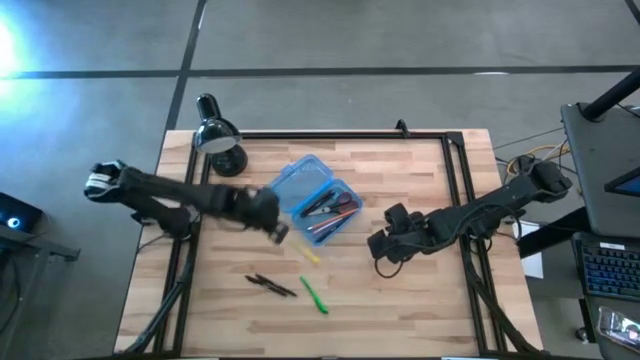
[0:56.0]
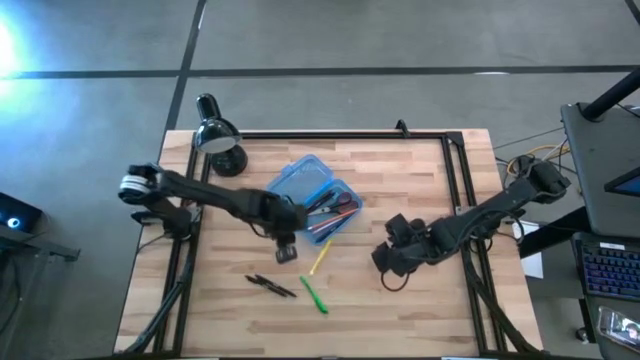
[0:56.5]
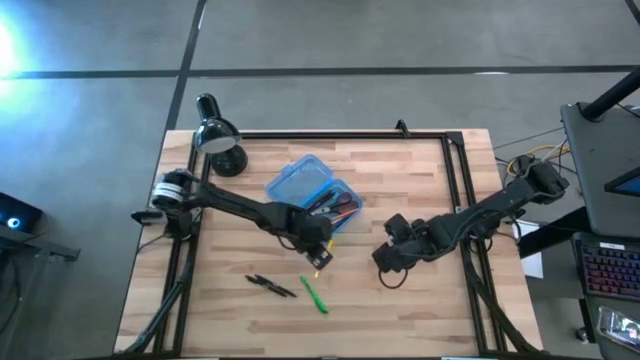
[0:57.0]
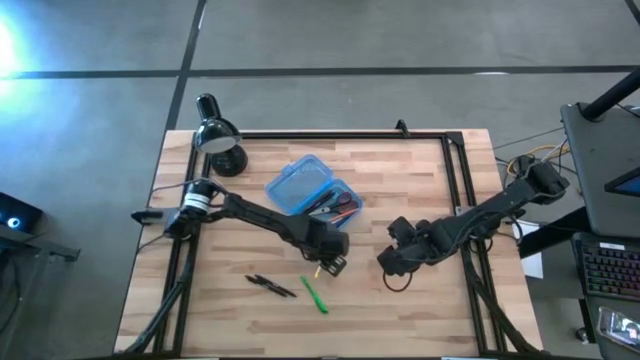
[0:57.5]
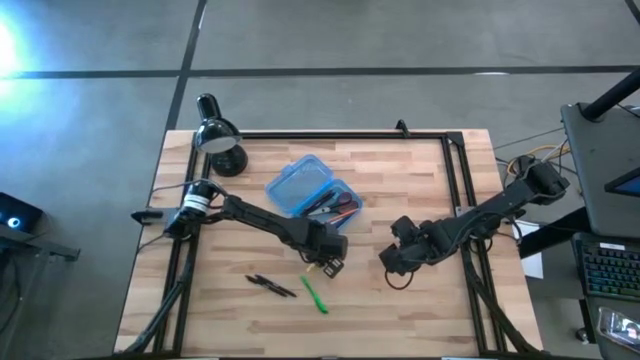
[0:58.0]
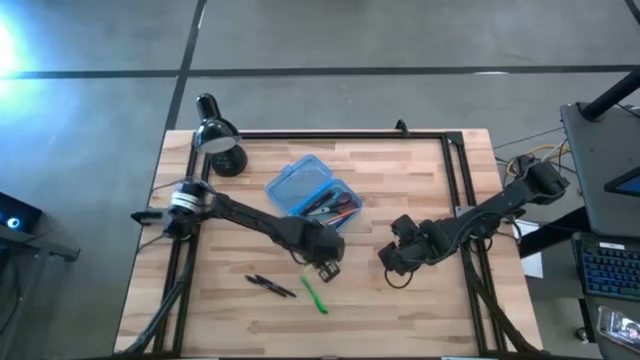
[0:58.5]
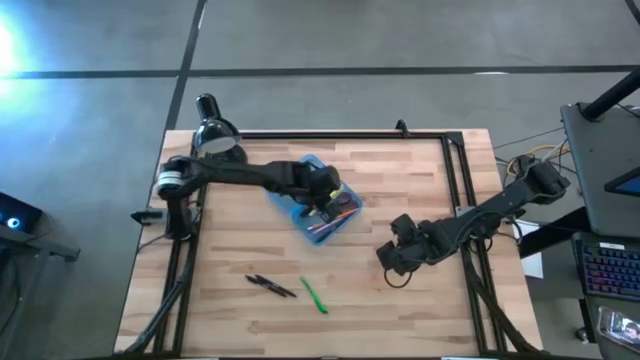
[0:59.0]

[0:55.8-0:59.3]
Task: Pick & place school supplies into a supply box
Put the yellow pen into the supply box

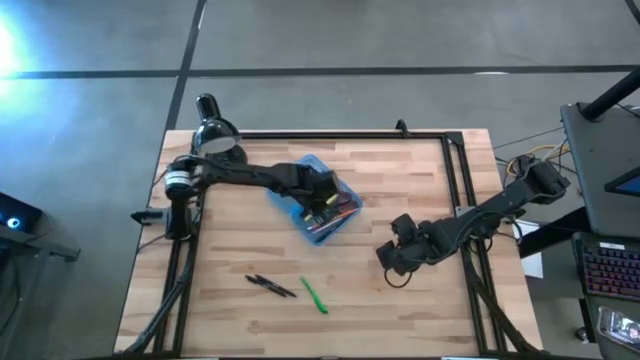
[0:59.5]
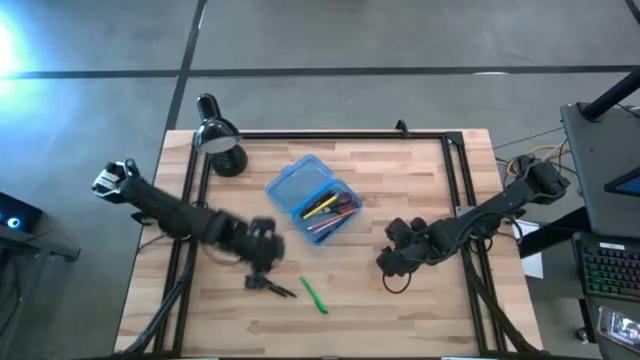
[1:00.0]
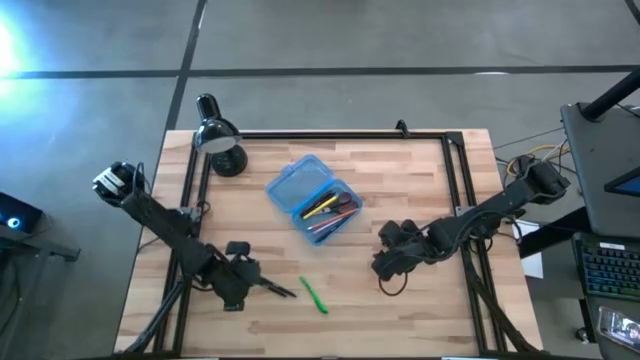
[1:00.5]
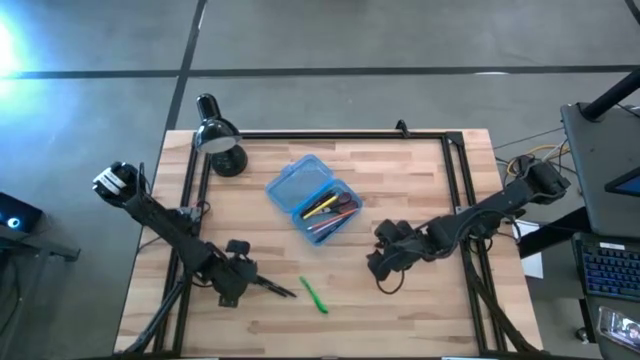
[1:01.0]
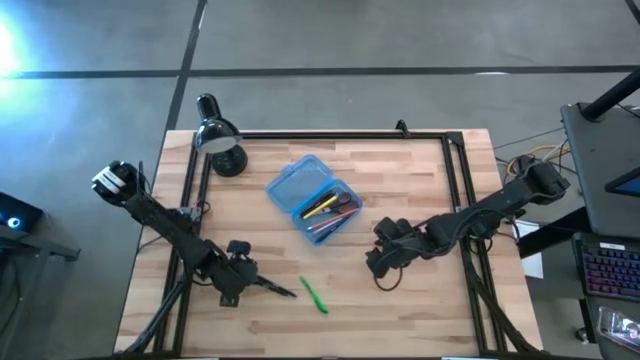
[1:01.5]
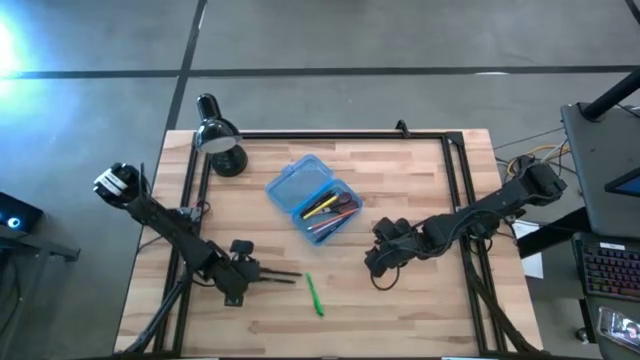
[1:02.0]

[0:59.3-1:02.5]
Put the left black pen into the supply box

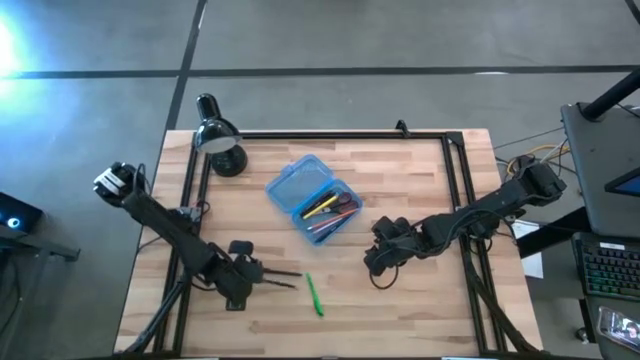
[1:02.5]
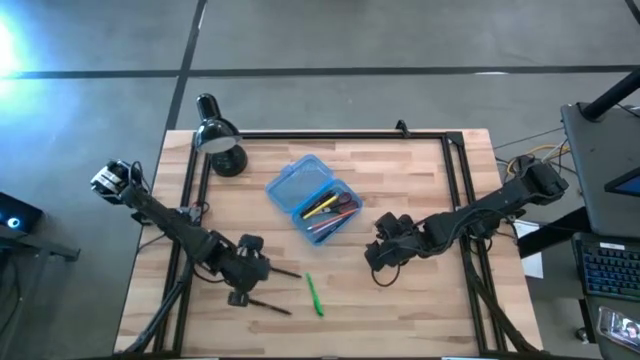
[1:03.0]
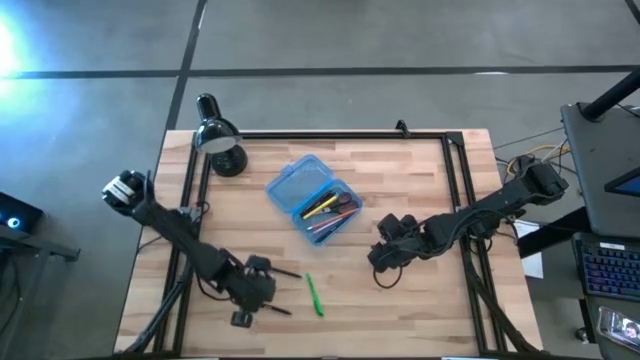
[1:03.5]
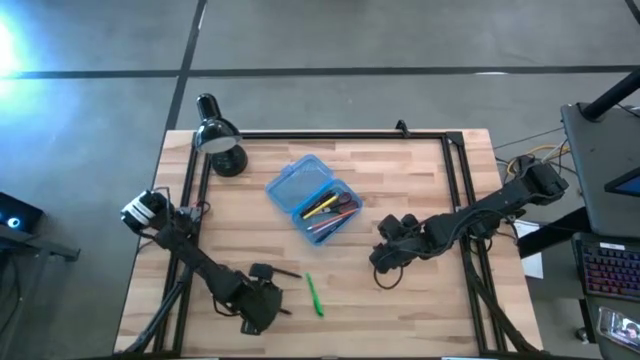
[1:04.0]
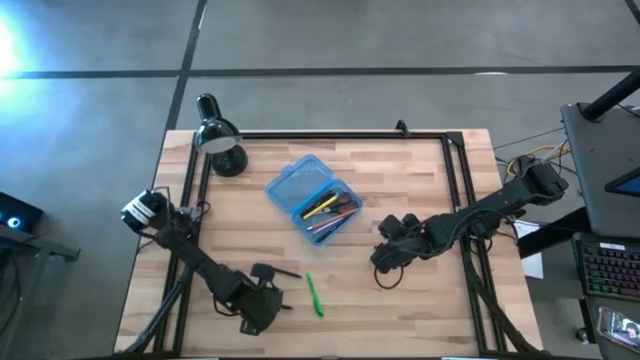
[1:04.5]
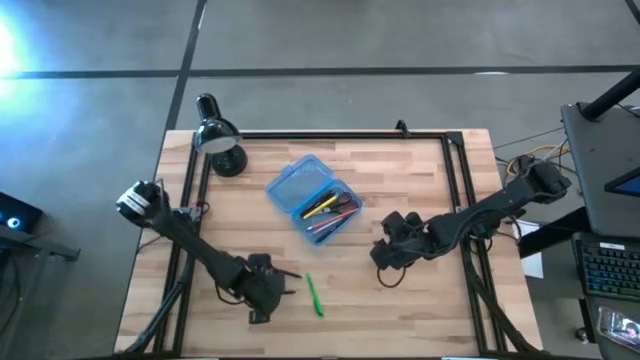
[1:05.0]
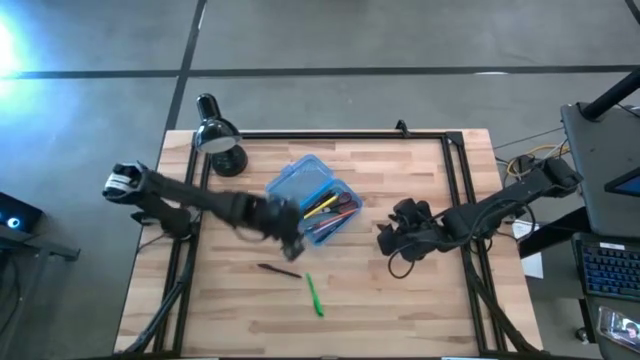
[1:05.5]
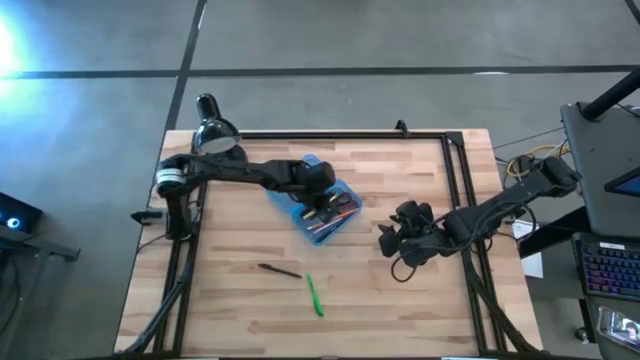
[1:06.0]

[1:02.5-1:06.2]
Put the left black pen into the supply box

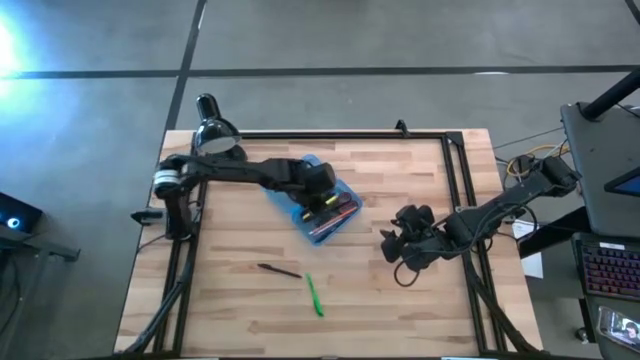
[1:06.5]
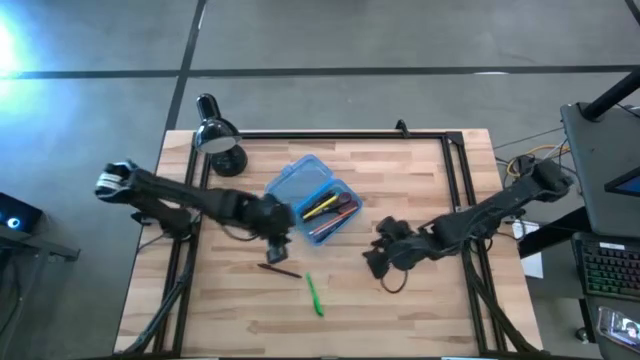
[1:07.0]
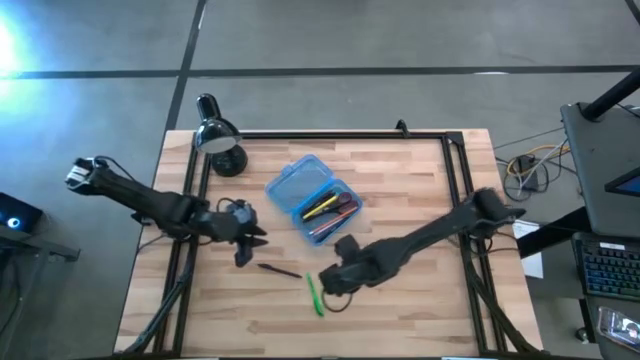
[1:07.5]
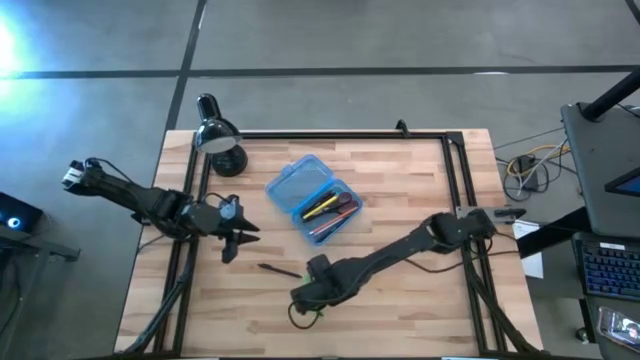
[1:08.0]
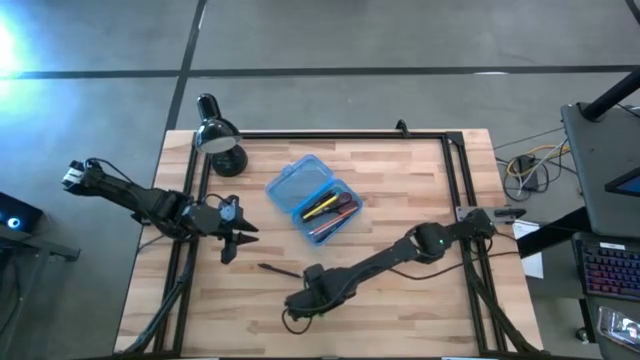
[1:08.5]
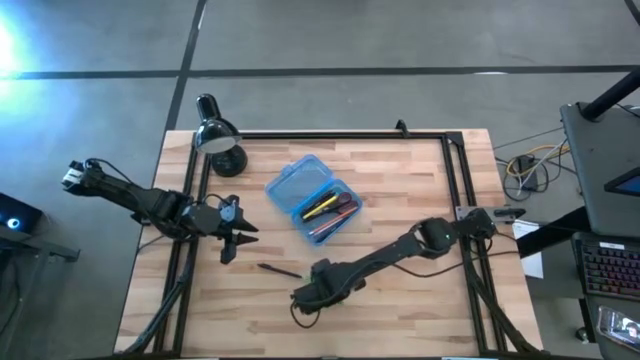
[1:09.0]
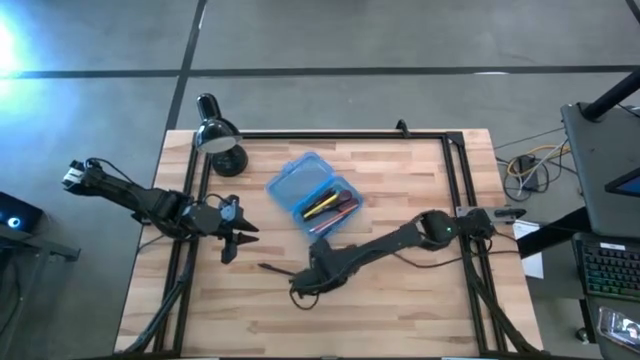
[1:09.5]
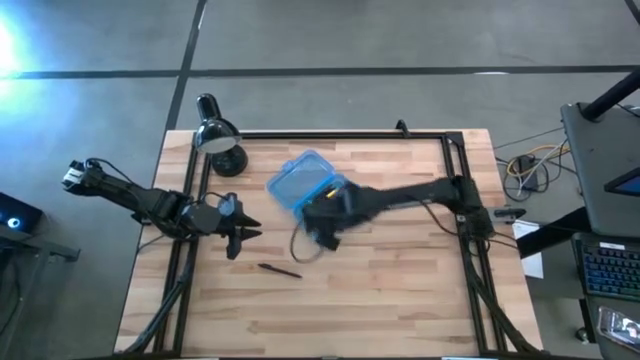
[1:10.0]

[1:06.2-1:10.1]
Put the green pen into the supply box

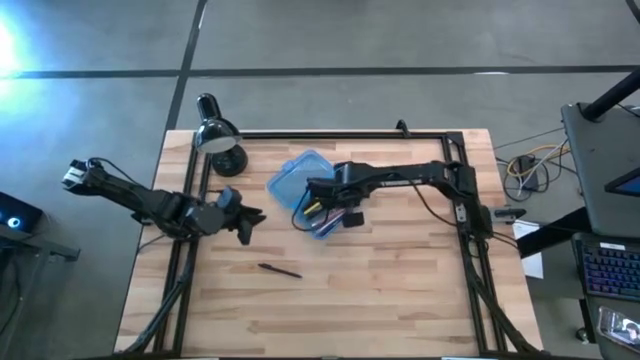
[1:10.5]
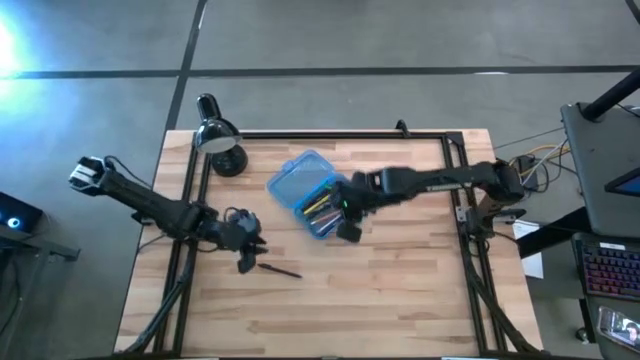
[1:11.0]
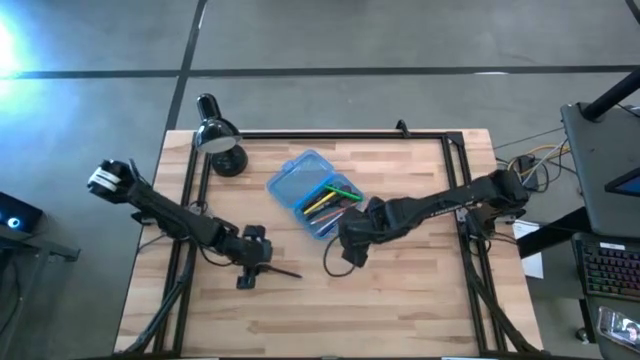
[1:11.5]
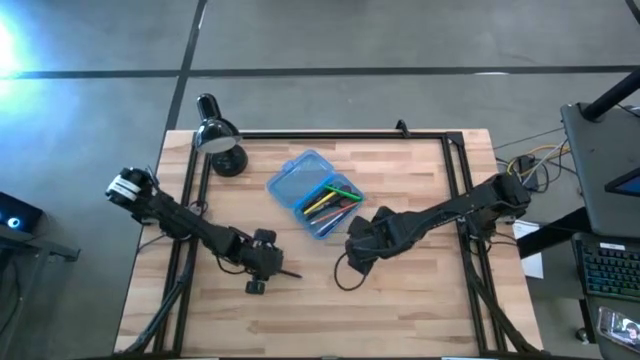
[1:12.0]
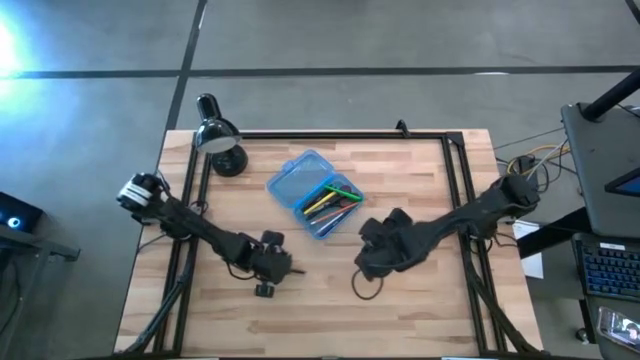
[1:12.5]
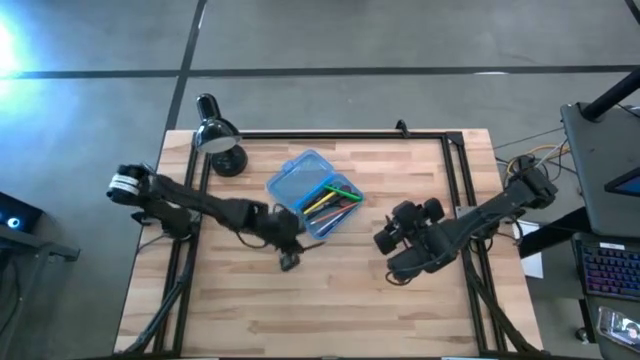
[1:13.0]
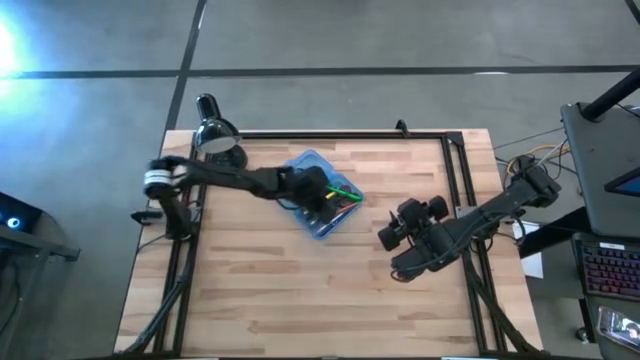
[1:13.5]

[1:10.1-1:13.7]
Put the black pen into the supply box

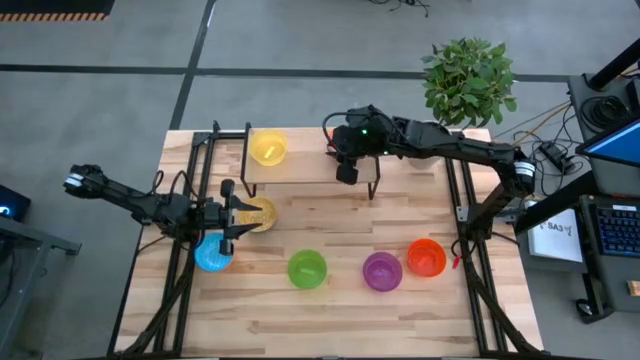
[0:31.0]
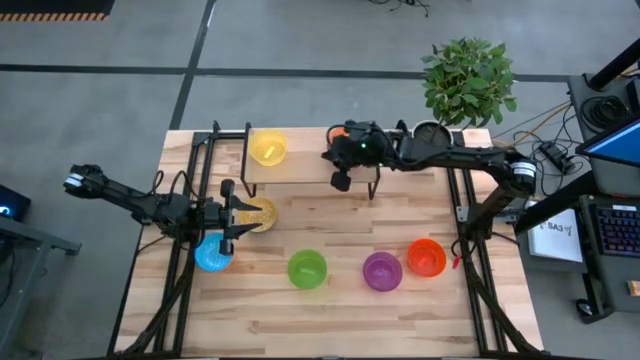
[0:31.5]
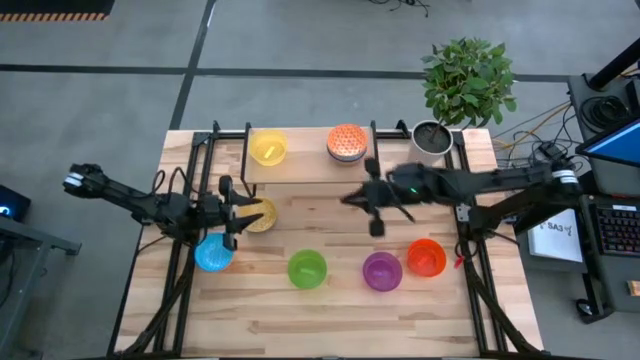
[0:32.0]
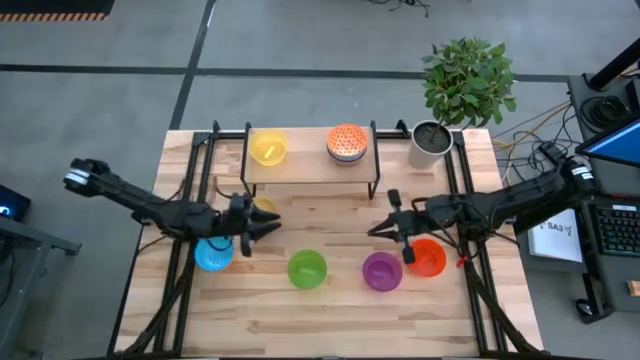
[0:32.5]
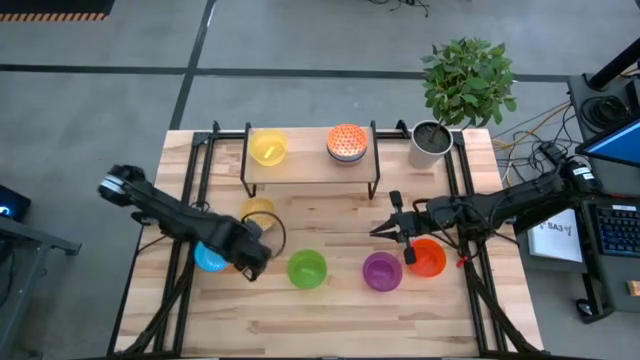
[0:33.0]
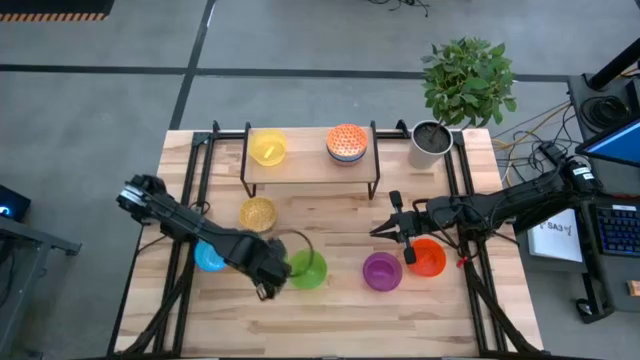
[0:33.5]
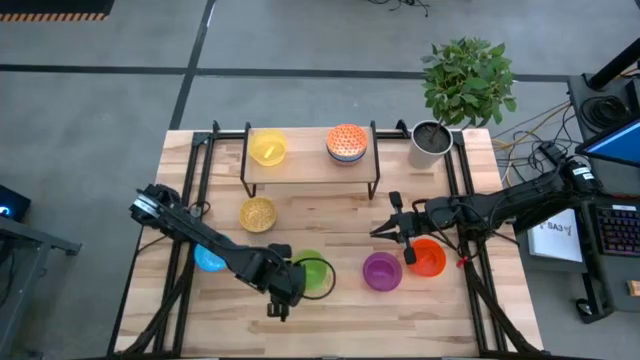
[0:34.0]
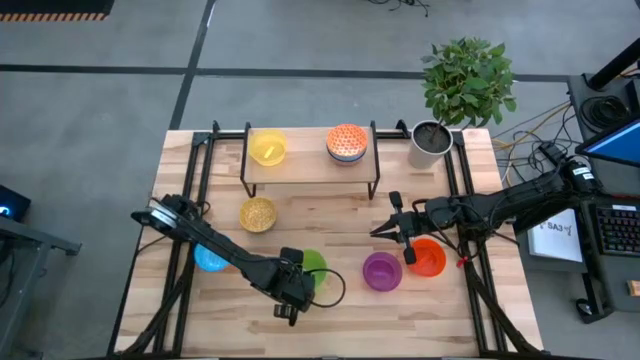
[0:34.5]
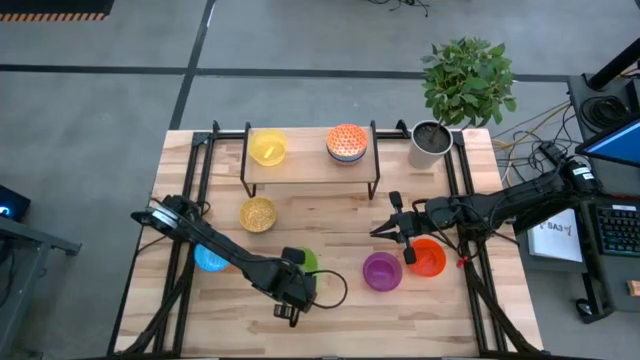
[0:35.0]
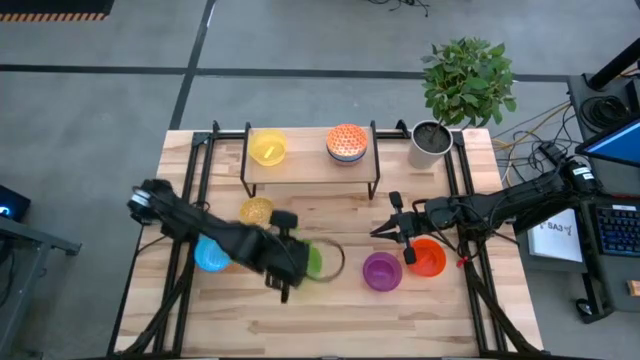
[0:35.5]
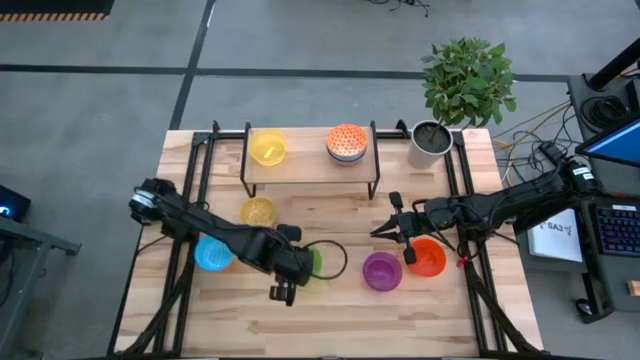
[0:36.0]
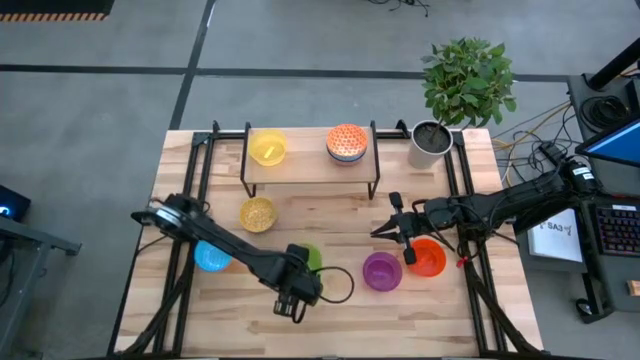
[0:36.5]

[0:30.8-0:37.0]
Task: Place and stack bowls onto a shelf
Stack the green bowl on the top of the yellow bowl on the shelf
